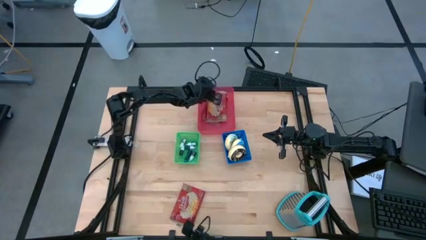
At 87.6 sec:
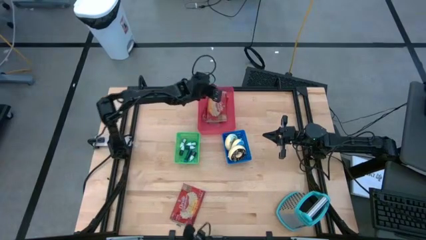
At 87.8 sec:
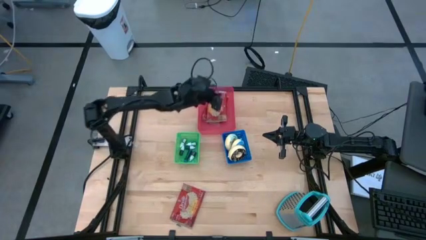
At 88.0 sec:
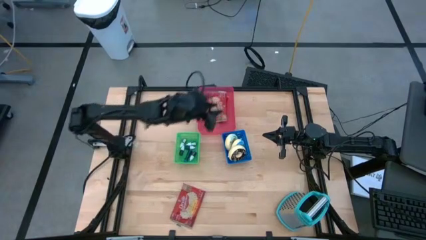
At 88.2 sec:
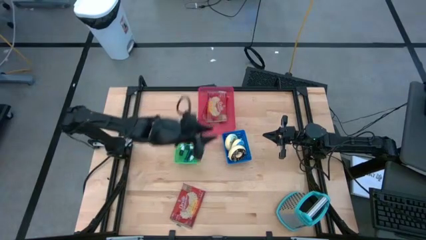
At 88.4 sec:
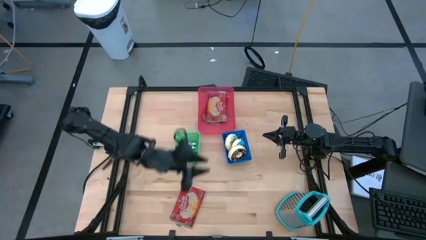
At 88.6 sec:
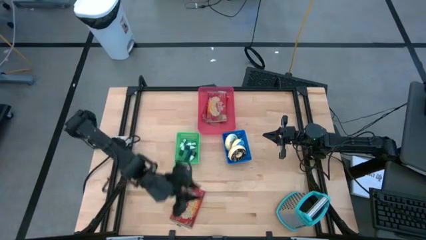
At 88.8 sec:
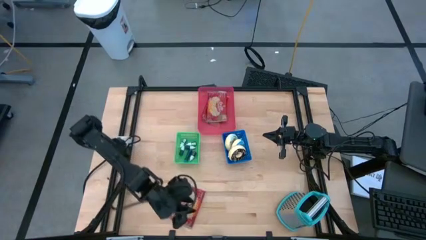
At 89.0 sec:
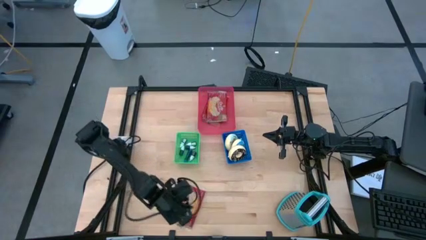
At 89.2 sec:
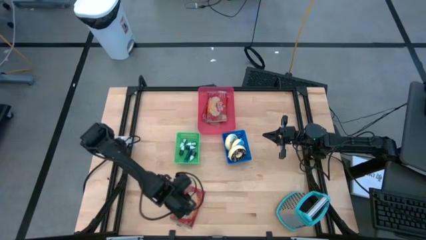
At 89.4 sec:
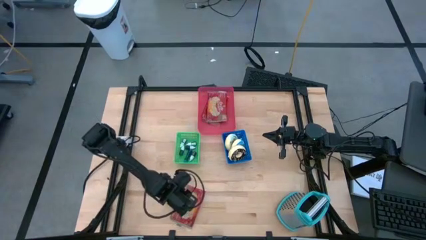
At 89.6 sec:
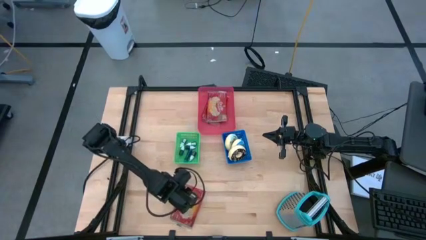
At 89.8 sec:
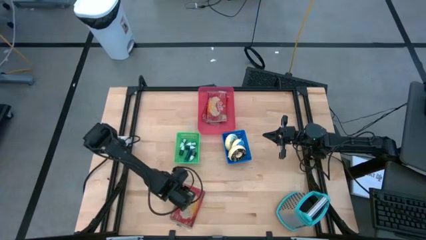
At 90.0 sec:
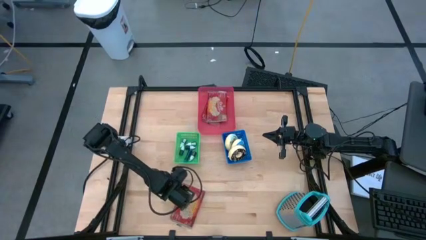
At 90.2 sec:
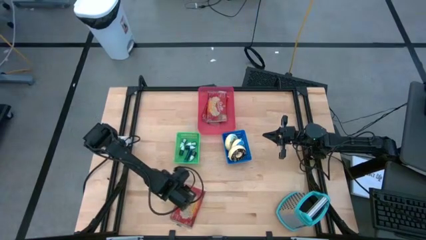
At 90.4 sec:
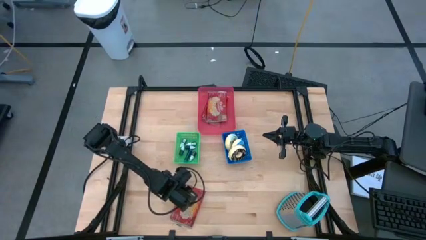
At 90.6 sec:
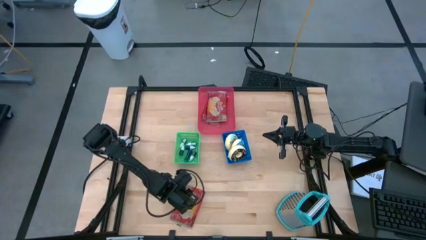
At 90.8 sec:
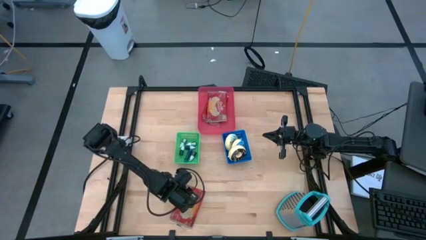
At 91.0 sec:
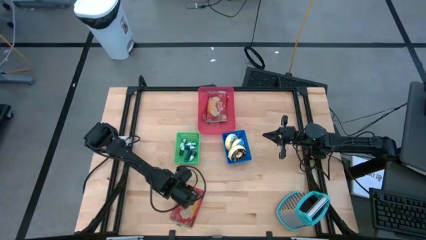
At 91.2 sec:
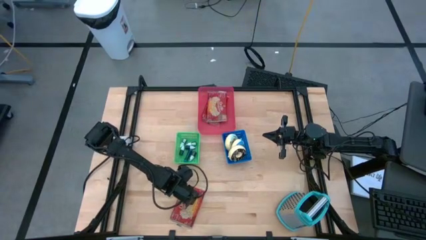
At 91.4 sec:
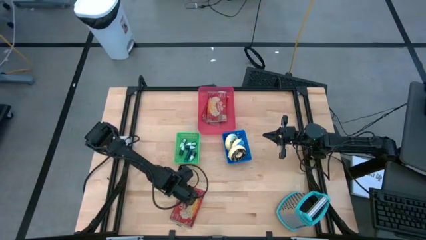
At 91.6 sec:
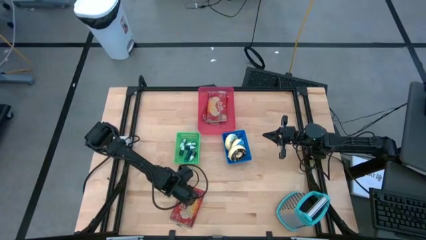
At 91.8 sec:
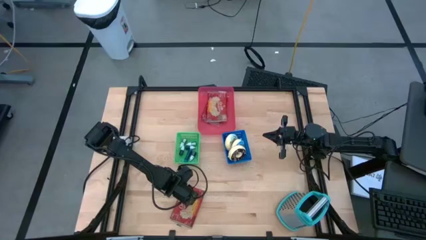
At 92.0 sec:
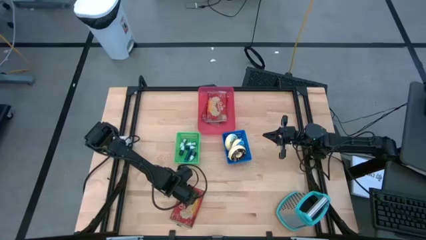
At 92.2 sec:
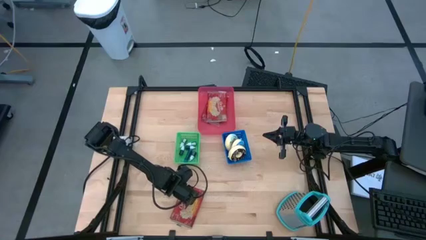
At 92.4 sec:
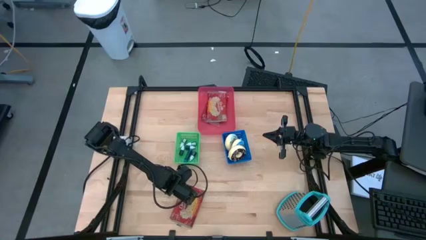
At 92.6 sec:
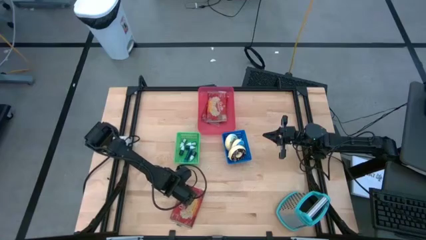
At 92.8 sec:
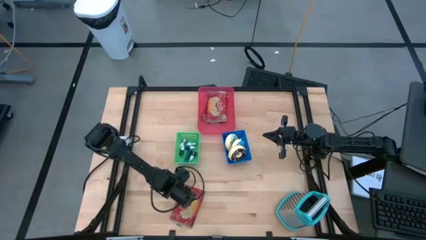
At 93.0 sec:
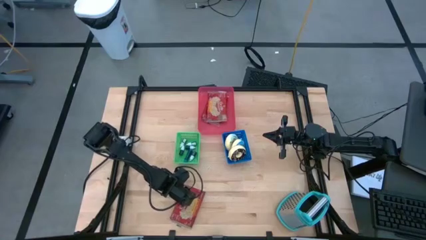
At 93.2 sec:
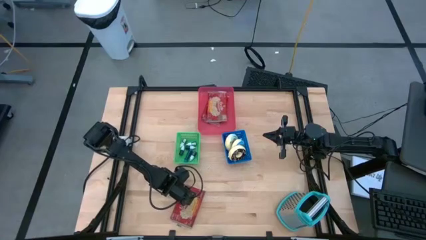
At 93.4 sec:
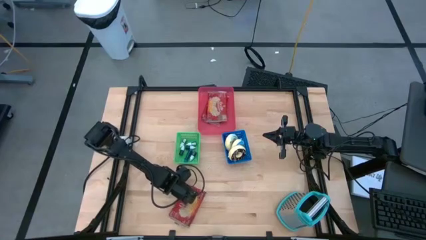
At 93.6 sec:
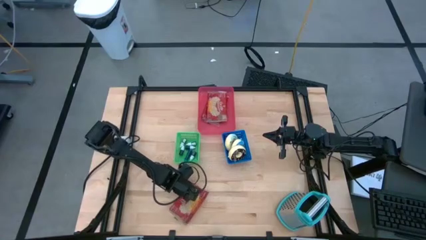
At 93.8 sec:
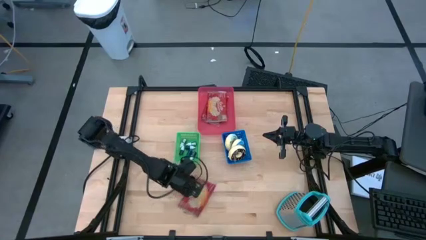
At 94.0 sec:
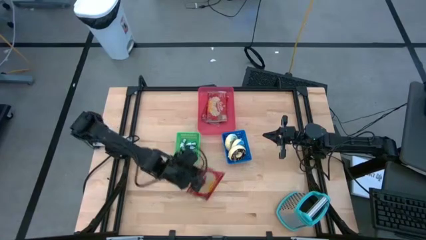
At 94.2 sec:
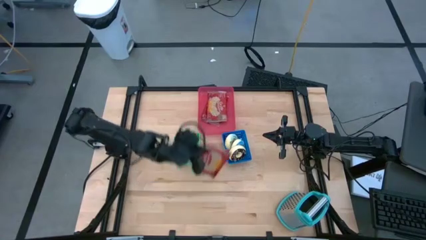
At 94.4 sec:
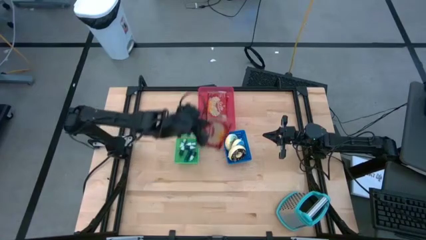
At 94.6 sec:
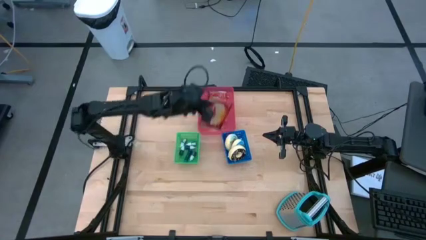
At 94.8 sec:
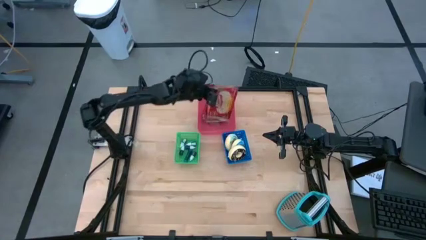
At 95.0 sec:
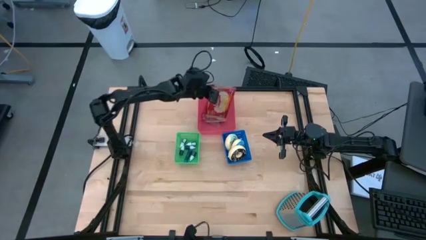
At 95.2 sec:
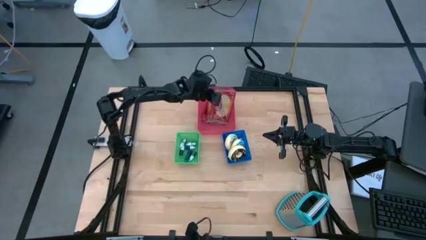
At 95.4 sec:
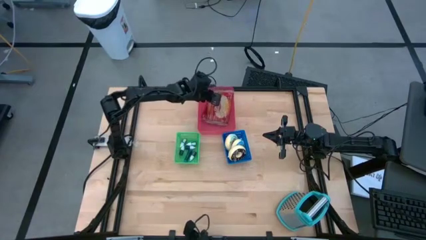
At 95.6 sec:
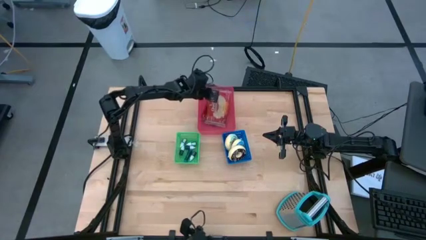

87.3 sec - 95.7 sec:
Put the red popcorn bag into the pink bin

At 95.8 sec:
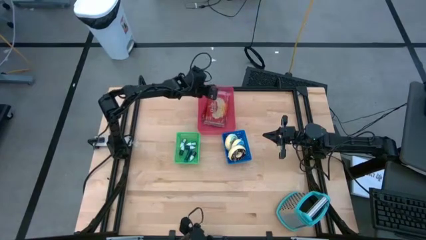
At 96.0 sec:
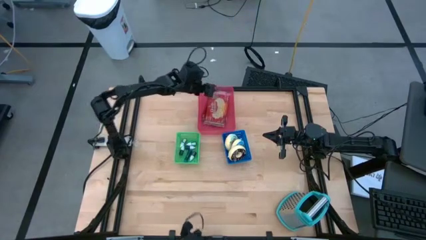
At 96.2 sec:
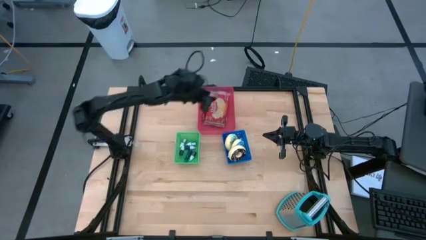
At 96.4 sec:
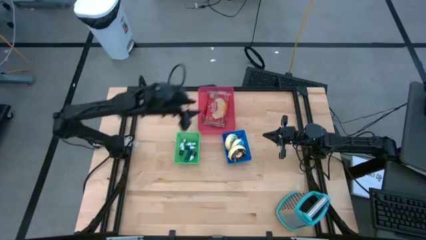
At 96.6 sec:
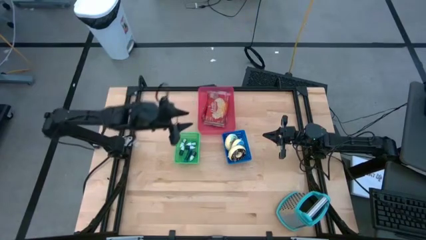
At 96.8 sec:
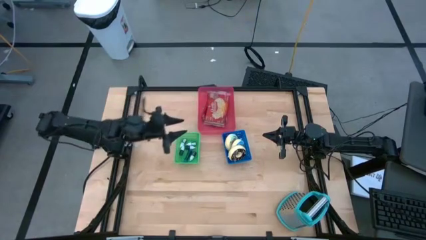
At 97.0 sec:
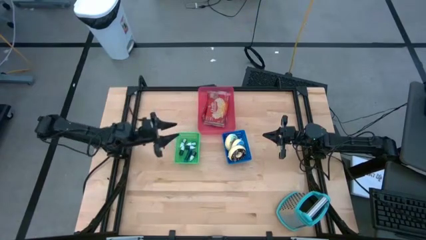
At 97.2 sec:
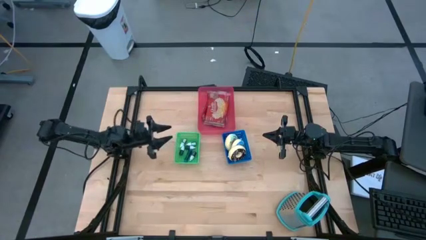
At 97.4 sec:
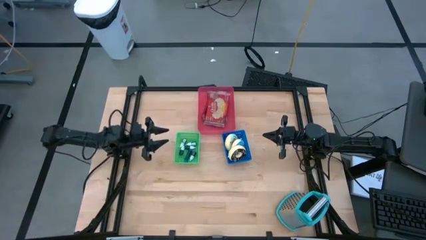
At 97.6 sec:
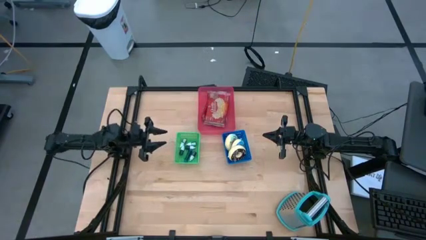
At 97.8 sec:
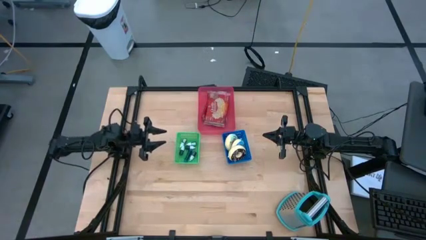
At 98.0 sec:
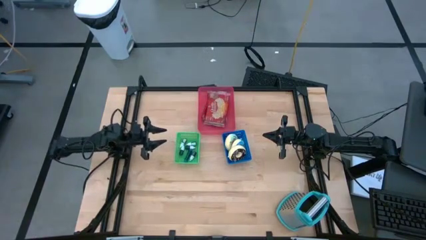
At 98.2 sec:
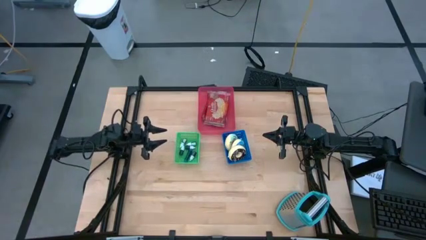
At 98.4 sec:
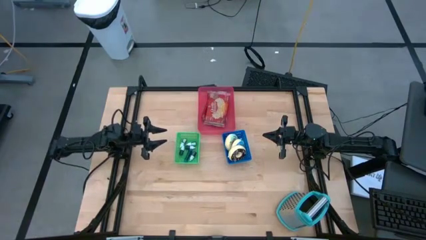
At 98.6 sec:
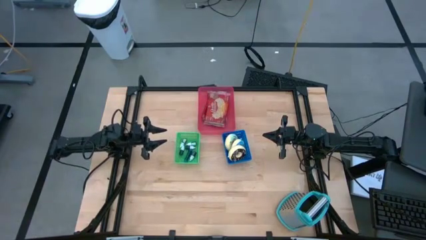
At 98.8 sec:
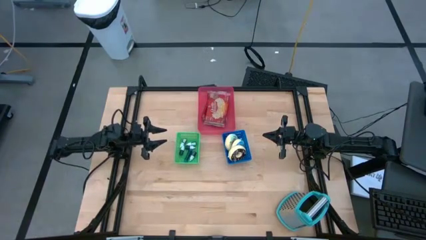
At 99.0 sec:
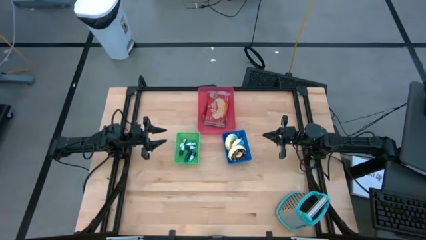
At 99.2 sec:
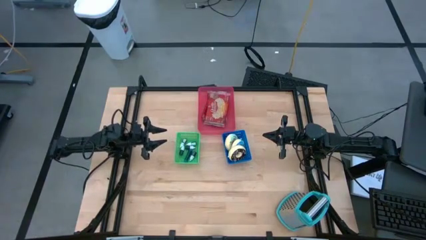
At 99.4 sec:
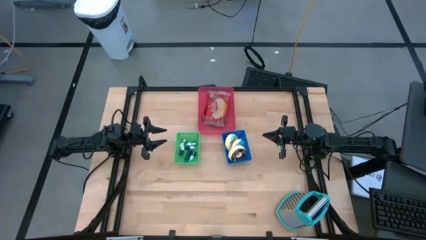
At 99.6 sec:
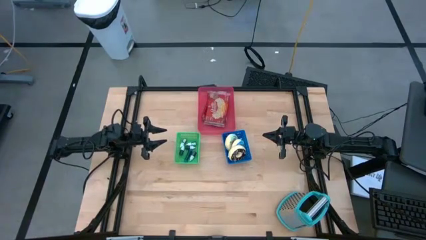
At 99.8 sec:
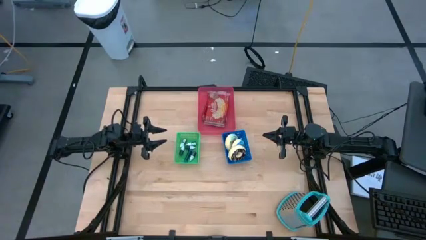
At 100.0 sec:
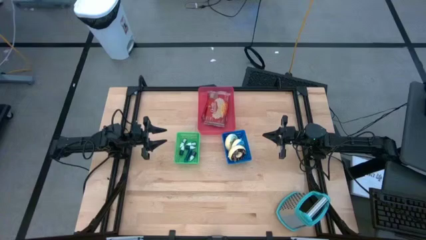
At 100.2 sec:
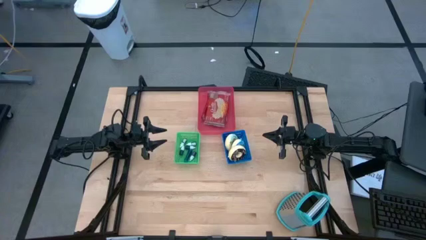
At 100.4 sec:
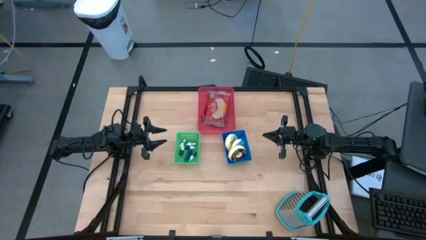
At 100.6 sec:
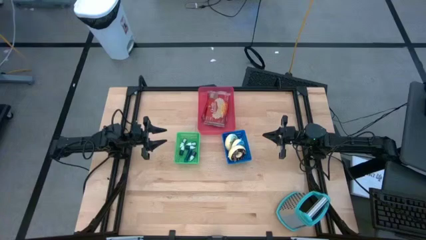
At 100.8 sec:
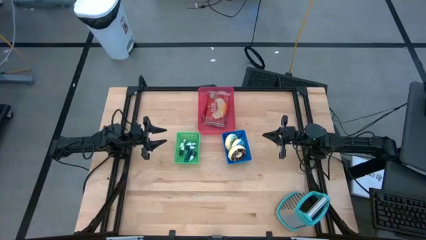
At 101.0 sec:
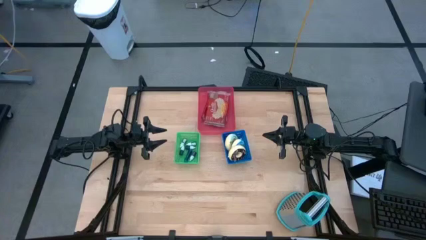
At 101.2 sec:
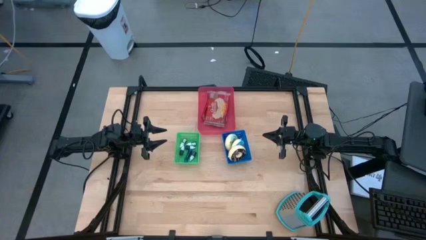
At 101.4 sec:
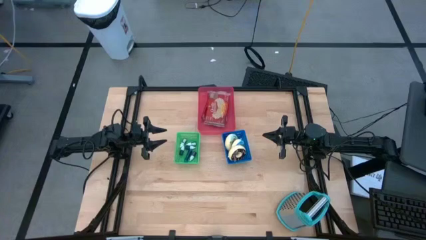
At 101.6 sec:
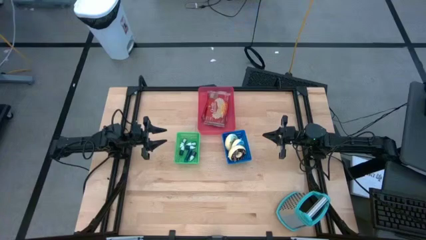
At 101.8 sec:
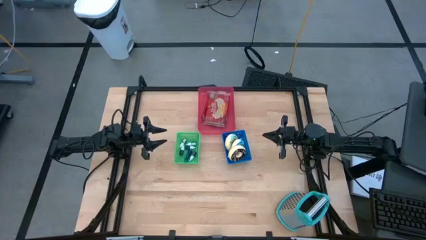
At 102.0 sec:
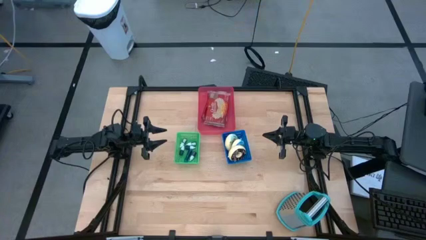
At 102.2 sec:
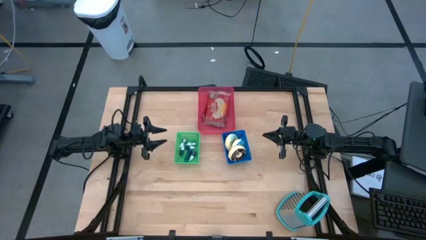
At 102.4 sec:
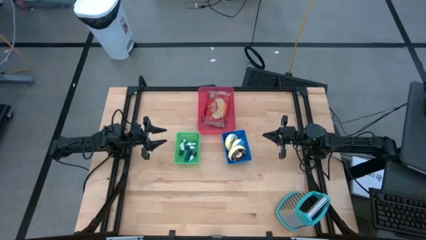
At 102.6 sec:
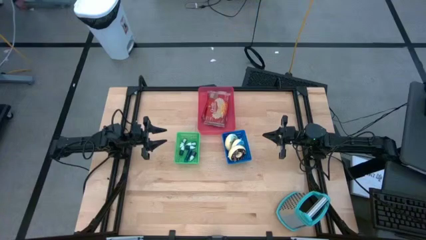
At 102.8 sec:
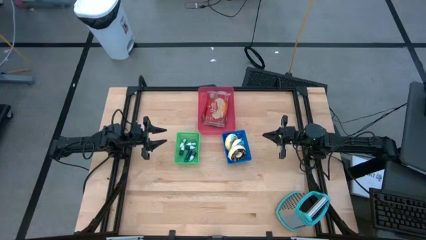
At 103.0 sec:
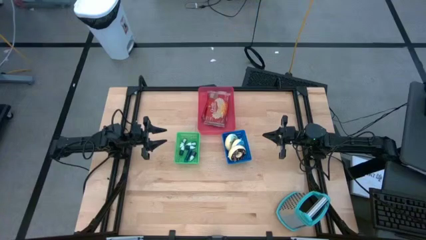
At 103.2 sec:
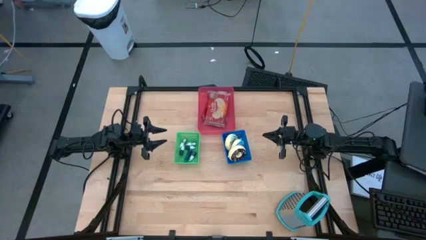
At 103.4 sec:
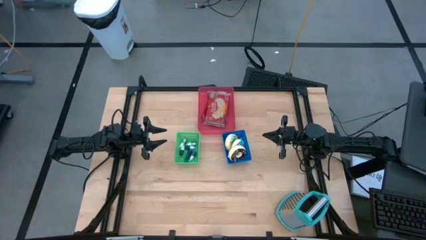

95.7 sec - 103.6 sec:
Return to Home Position
